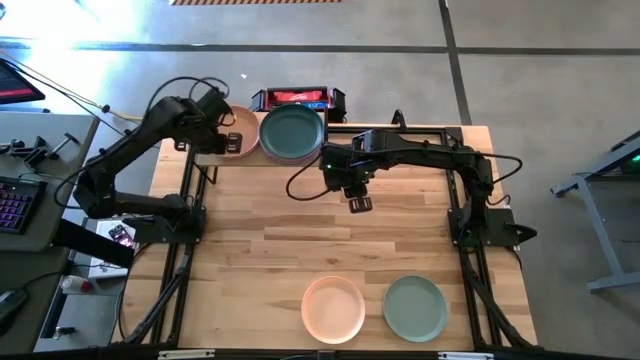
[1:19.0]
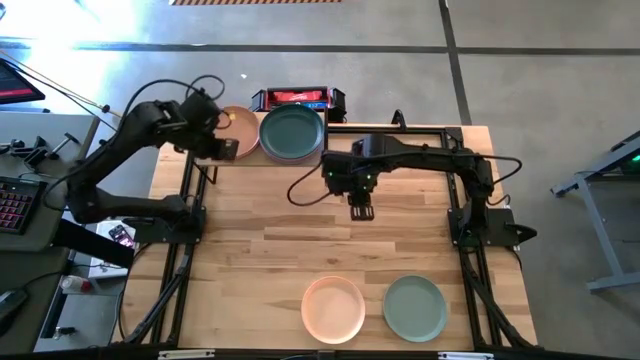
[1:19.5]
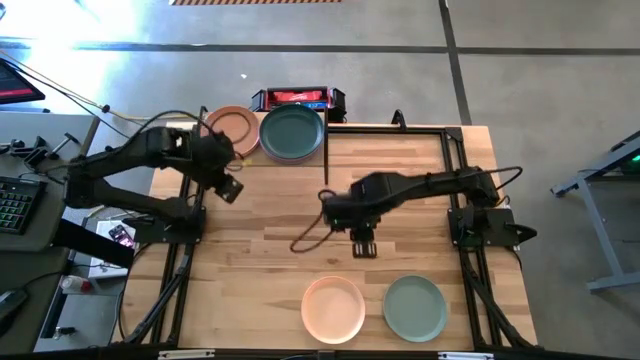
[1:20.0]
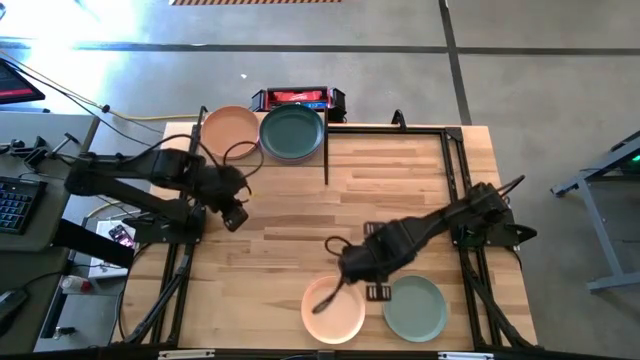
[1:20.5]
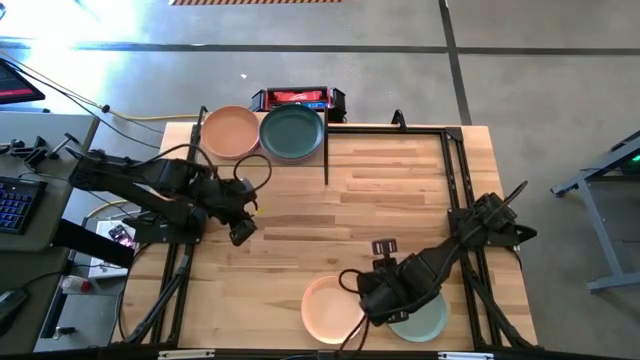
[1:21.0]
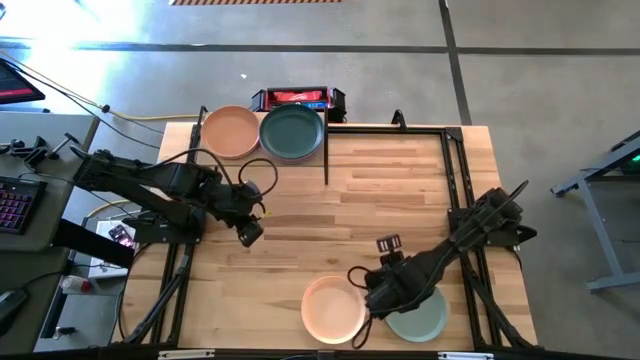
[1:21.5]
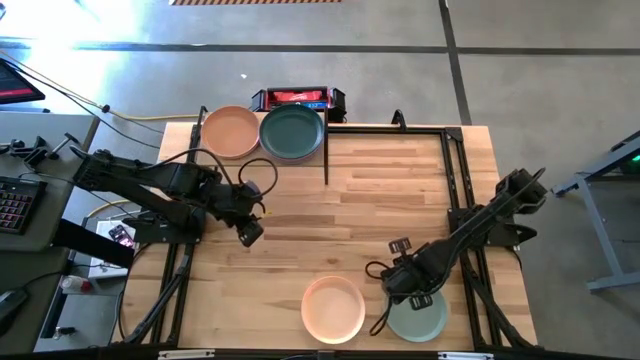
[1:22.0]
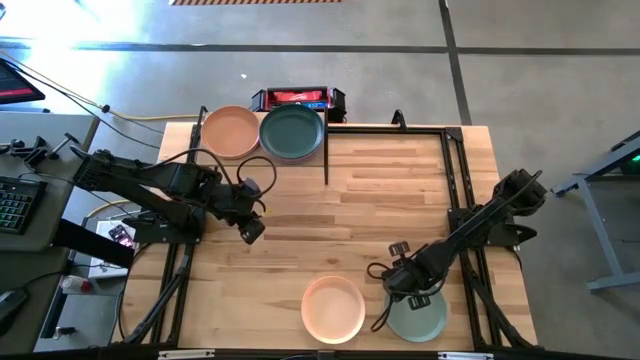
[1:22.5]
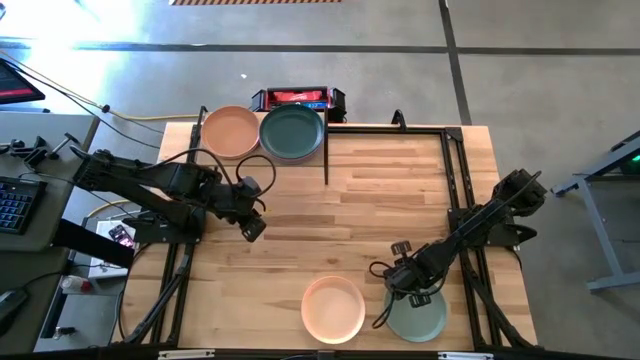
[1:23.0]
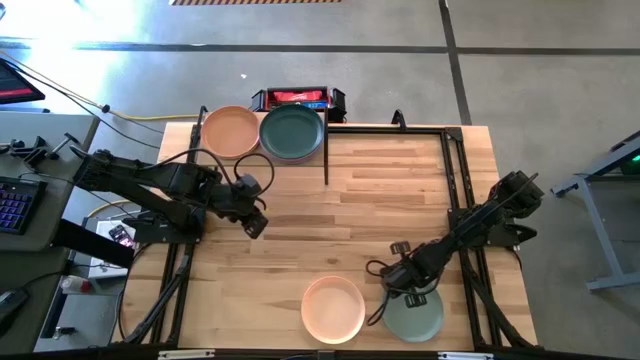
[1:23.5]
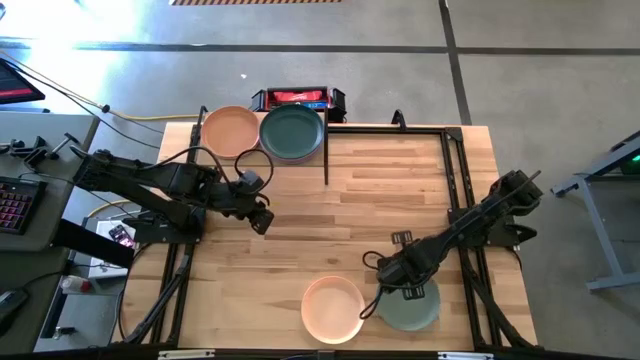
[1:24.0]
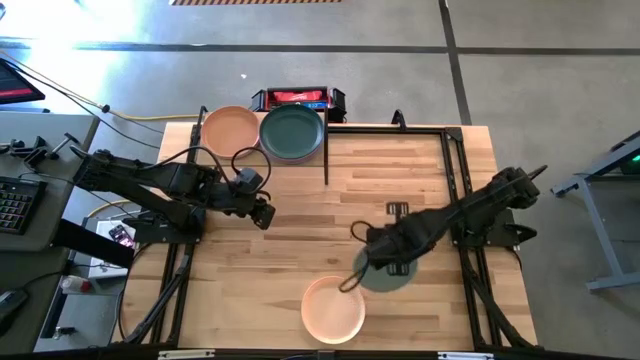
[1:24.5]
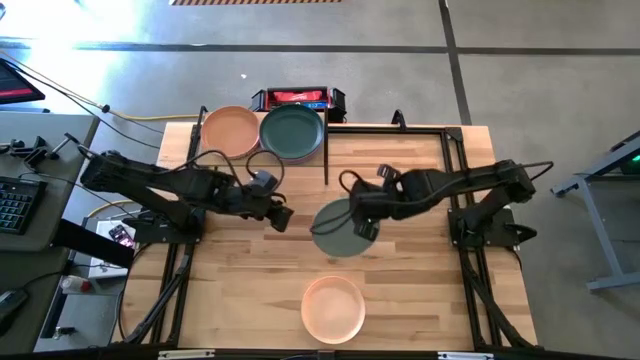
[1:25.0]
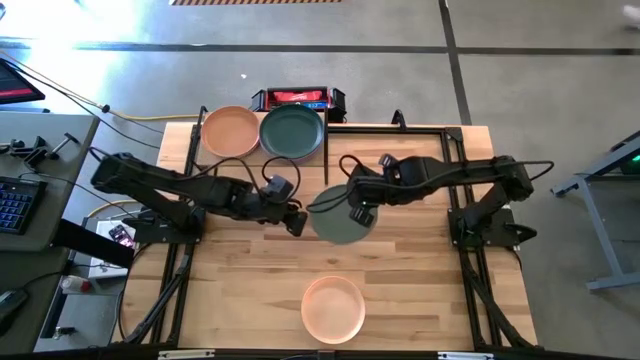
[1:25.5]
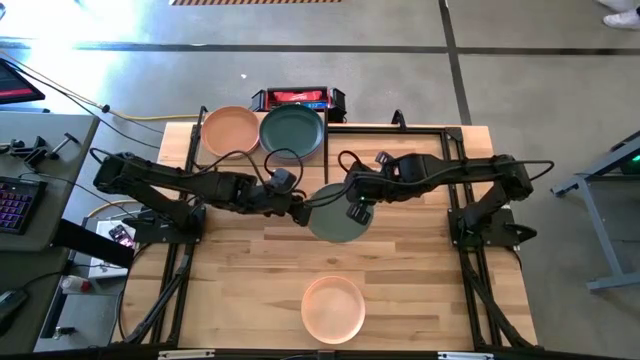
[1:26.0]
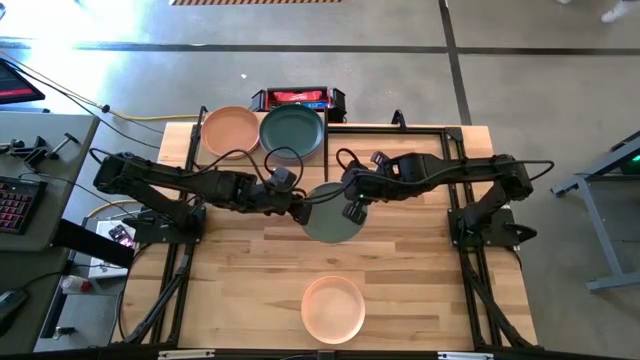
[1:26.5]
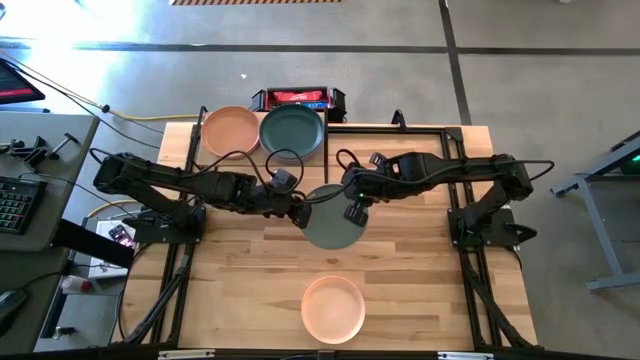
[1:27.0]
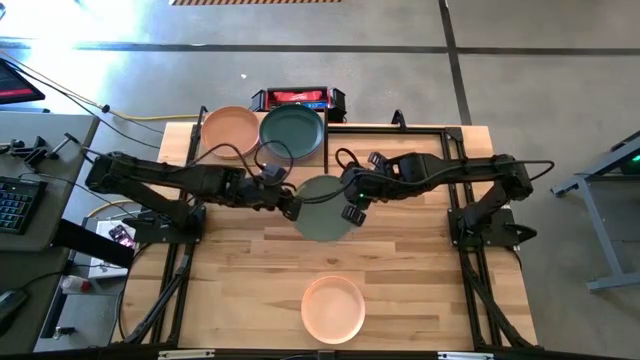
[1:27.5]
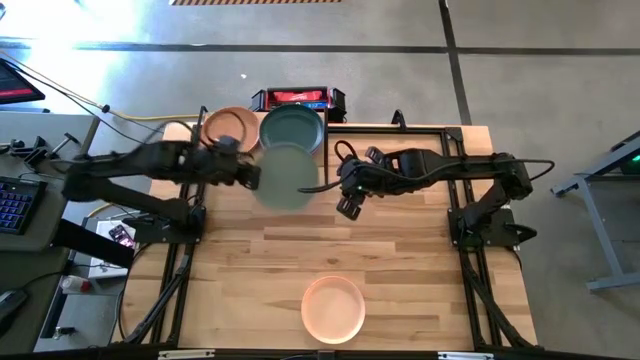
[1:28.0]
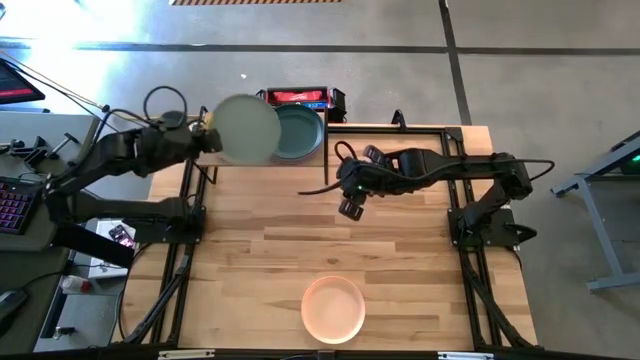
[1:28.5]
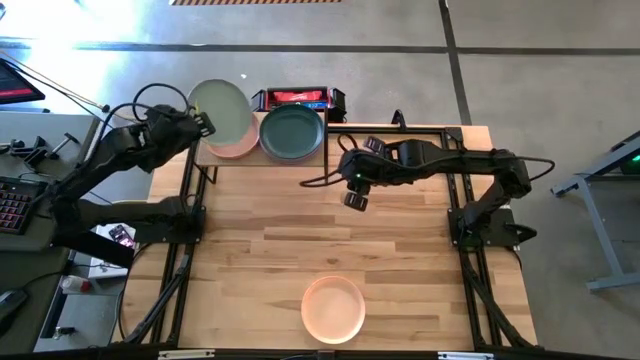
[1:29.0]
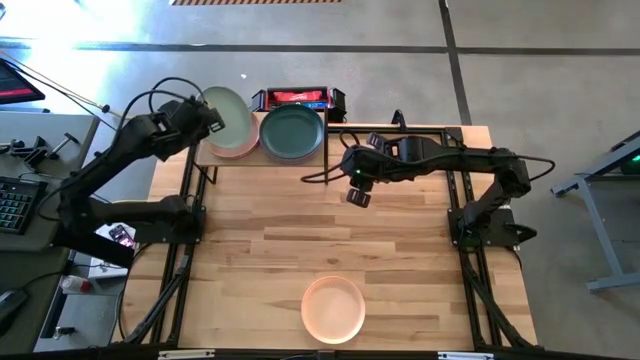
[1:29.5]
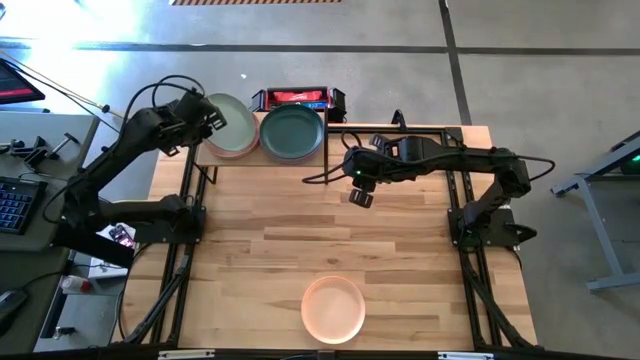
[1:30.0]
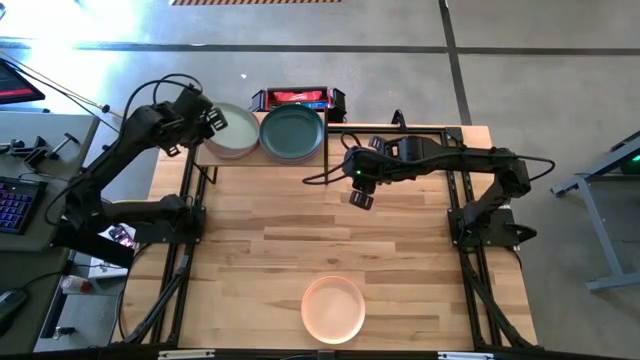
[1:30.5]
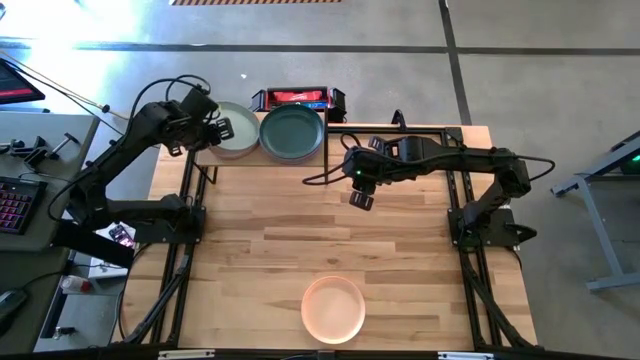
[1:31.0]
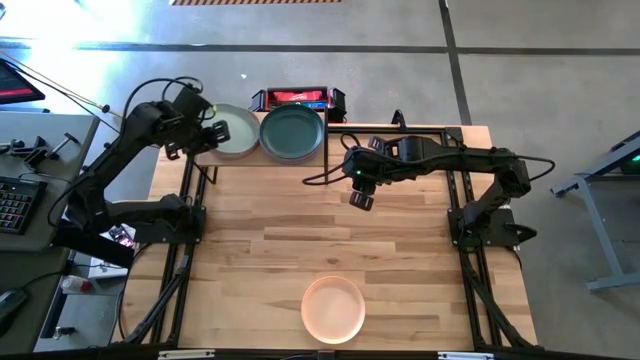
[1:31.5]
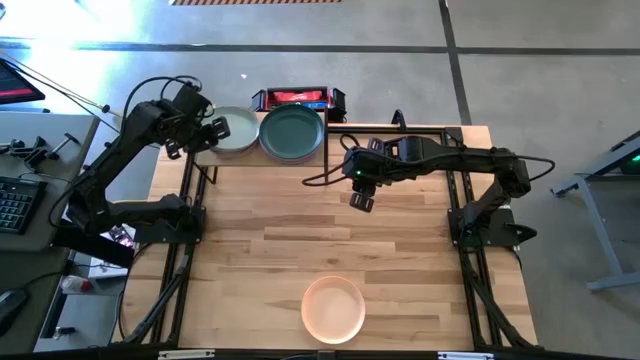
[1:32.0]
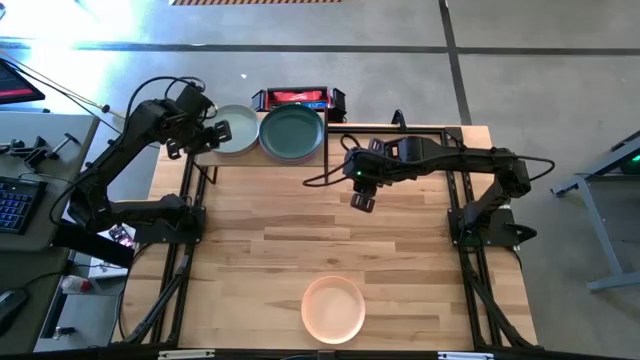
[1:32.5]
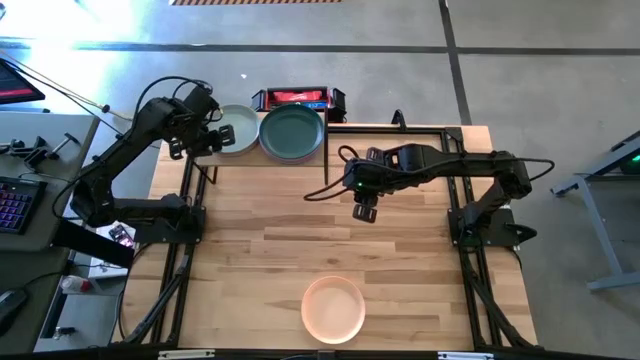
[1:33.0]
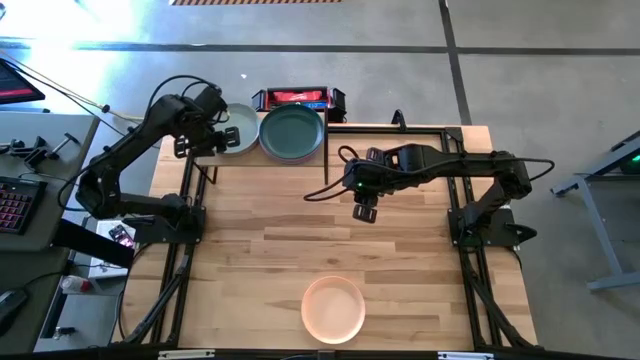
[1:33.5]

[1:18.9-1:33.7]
Task: Place and stack plates onto a shelf
Stack the light green plate on top of the brown plate on the shelf

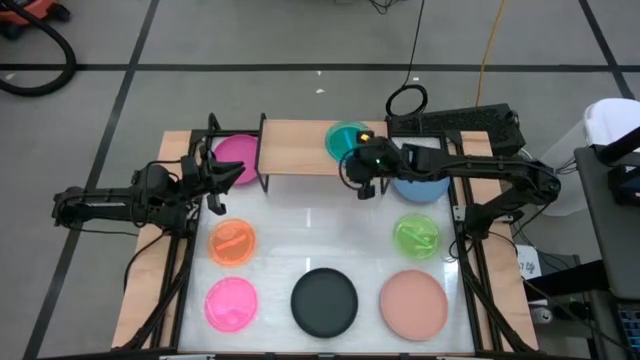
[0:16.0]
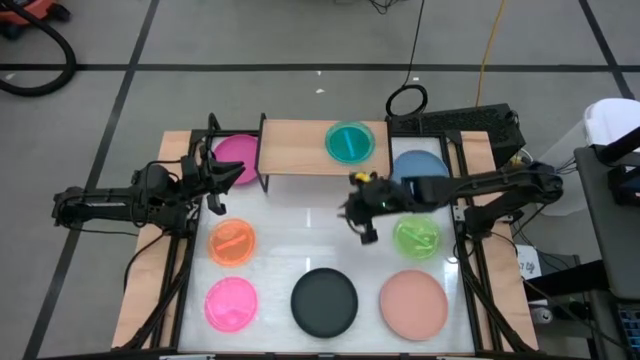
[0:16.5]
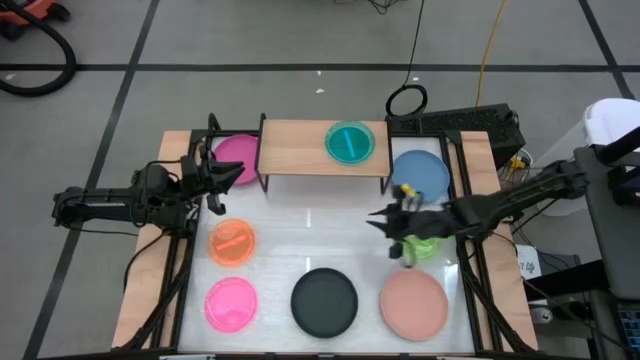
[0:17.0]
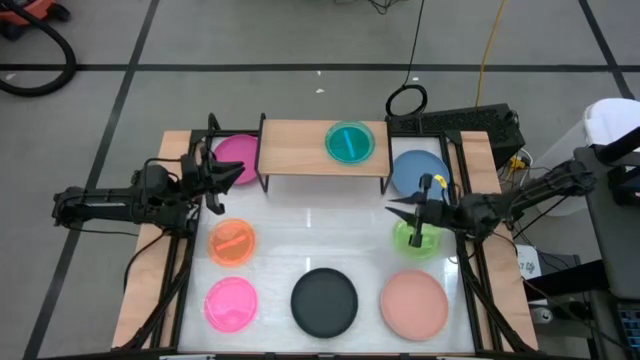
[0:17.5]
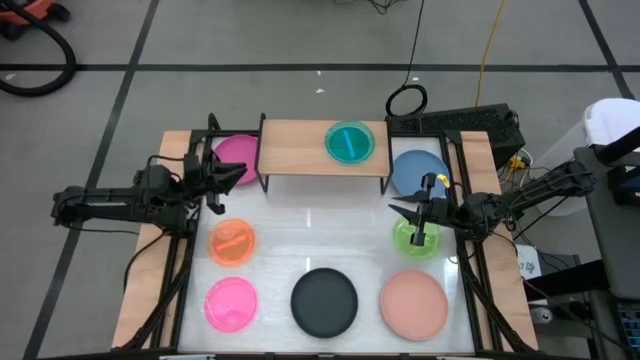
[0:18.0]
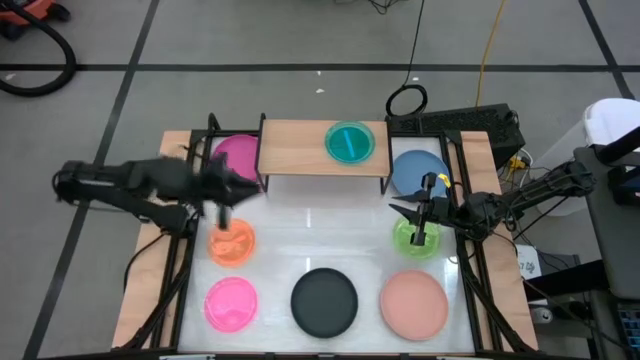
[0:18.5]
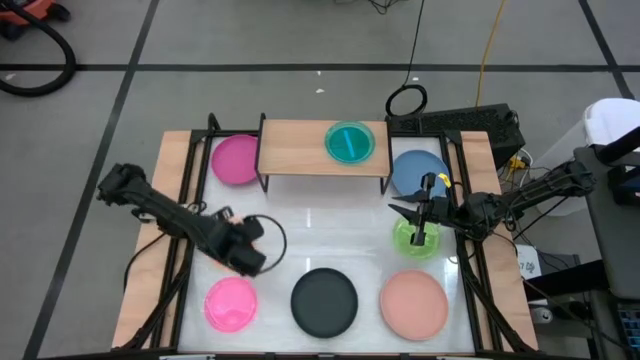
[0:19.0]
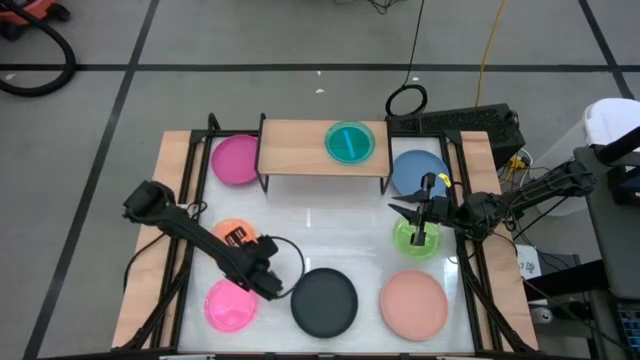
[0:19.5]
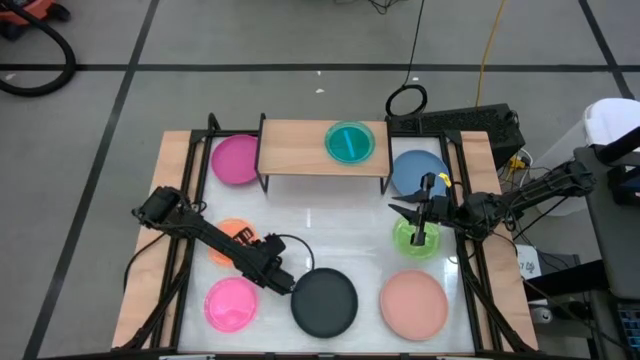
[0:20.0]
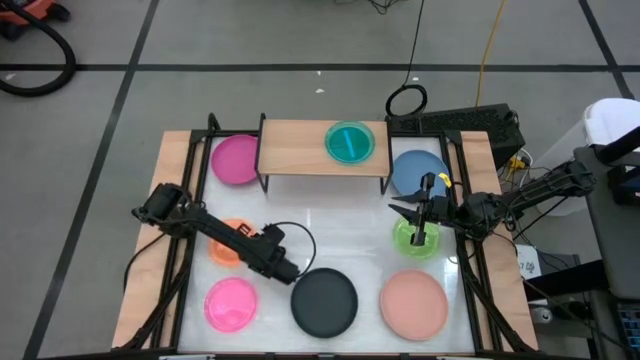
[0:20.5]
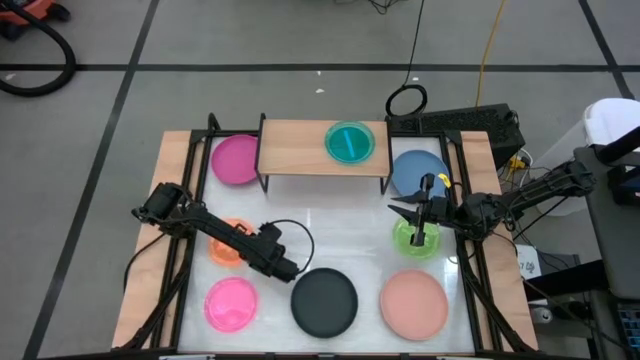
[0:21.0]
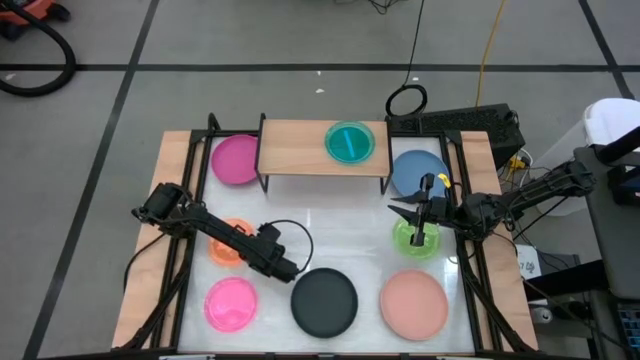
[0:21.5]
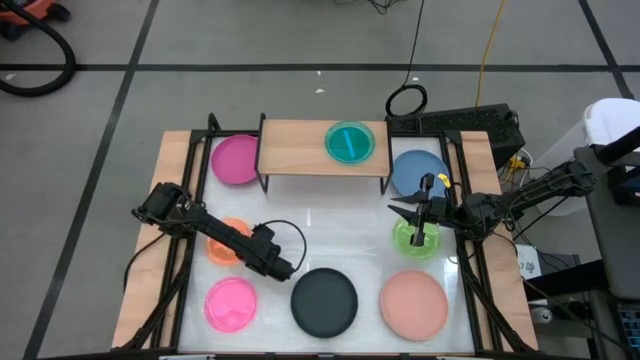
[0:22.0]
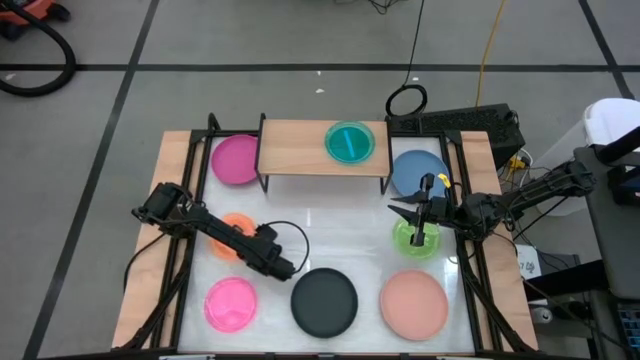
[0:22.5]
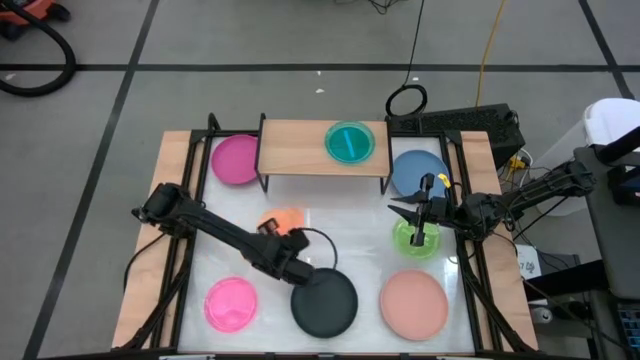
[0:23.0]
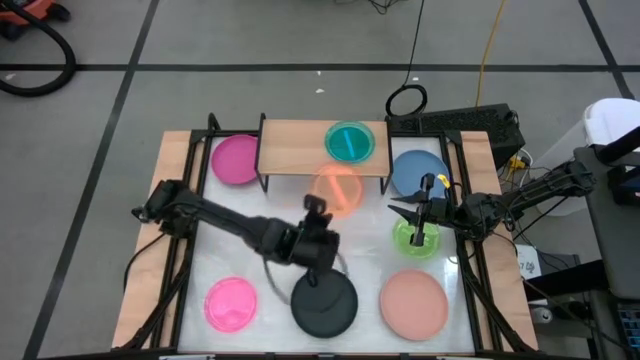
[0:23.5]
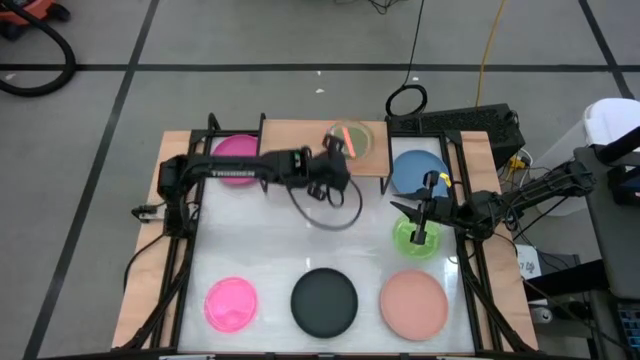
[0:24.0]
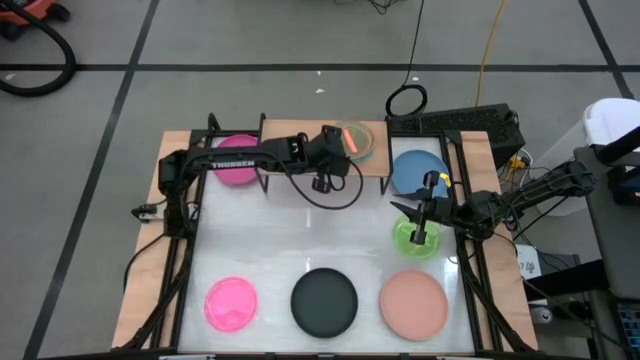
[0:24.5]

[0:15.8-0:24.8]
Task: Place and stack plates onto a shelf
Stack the orange plate on top of the light blue plate on the shelf
